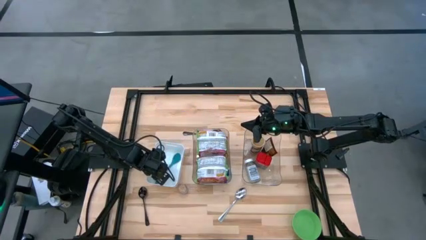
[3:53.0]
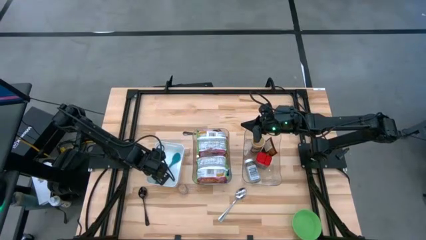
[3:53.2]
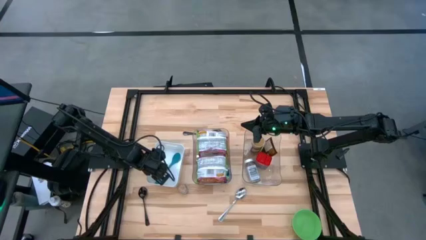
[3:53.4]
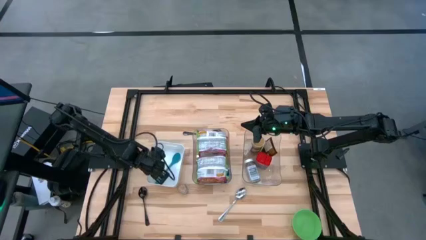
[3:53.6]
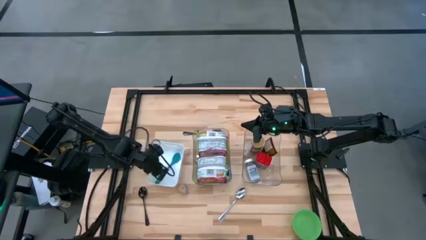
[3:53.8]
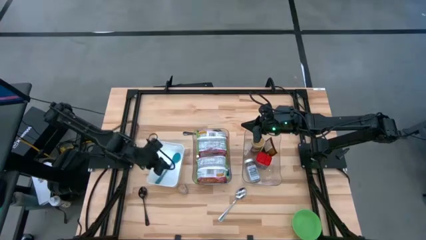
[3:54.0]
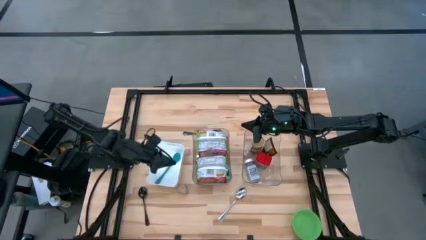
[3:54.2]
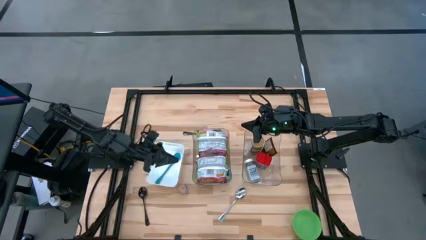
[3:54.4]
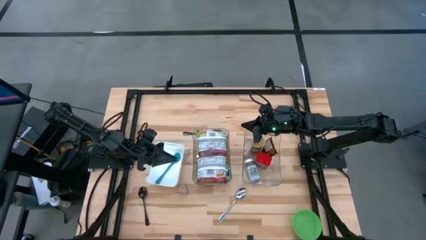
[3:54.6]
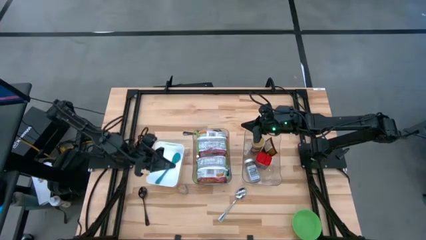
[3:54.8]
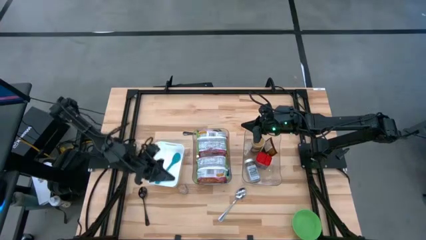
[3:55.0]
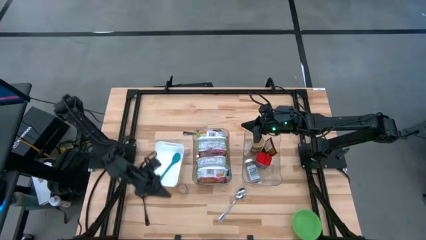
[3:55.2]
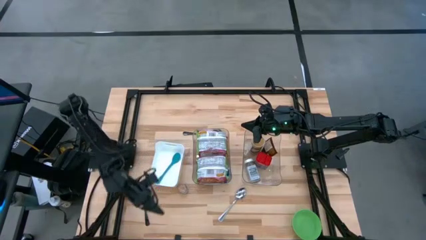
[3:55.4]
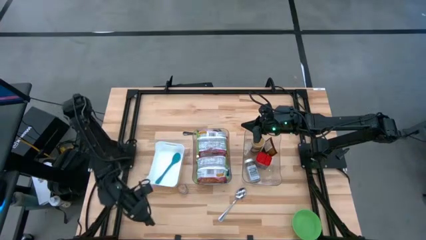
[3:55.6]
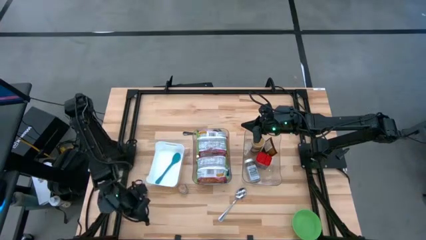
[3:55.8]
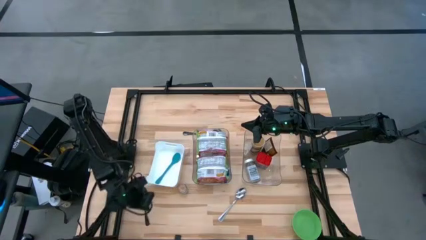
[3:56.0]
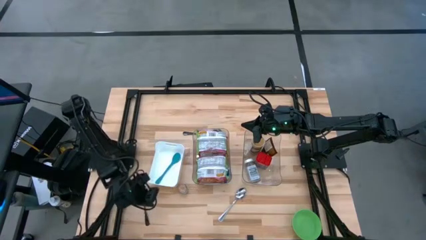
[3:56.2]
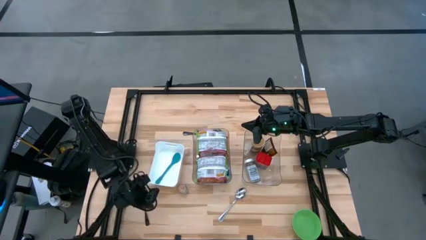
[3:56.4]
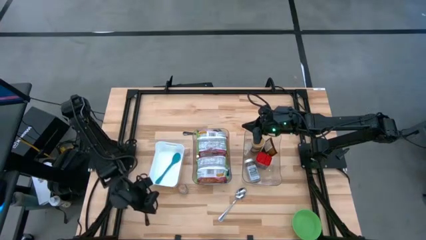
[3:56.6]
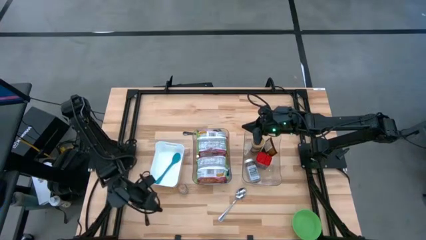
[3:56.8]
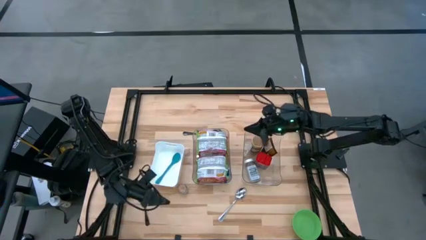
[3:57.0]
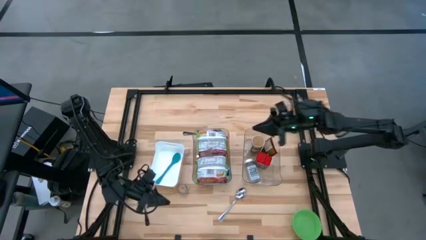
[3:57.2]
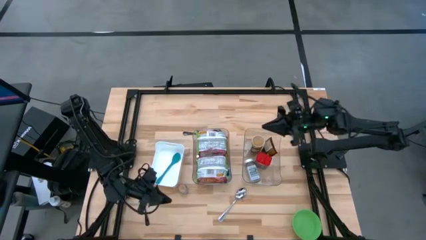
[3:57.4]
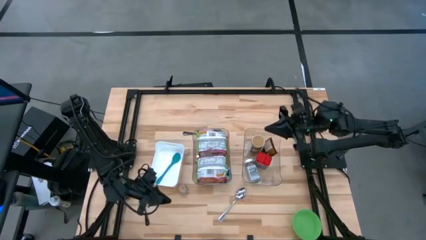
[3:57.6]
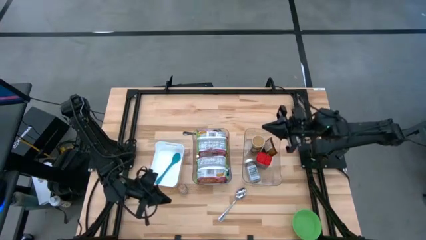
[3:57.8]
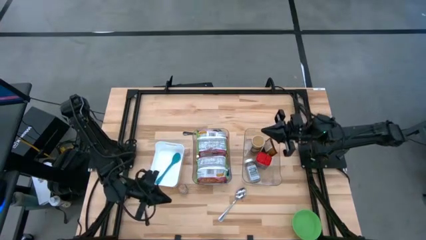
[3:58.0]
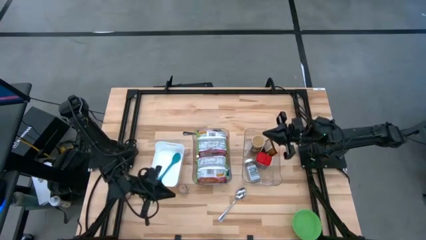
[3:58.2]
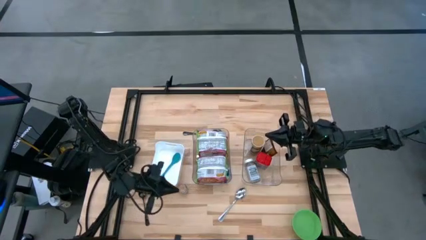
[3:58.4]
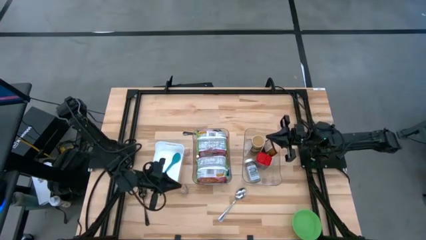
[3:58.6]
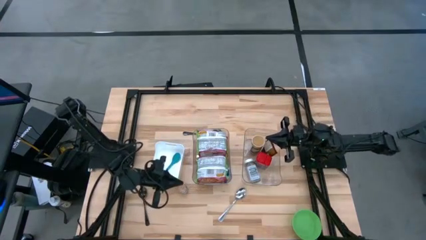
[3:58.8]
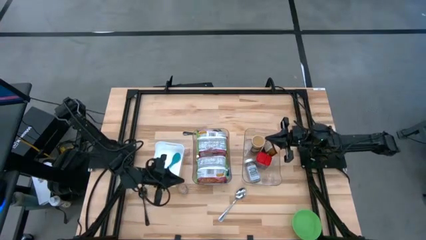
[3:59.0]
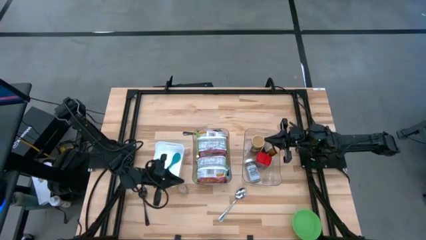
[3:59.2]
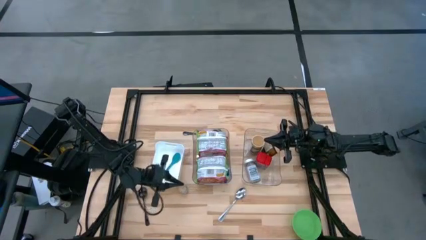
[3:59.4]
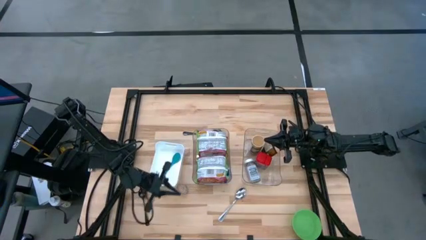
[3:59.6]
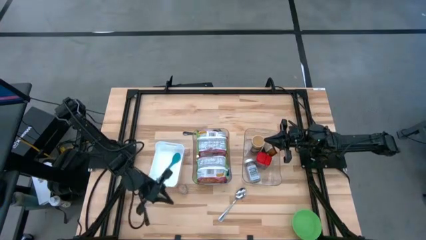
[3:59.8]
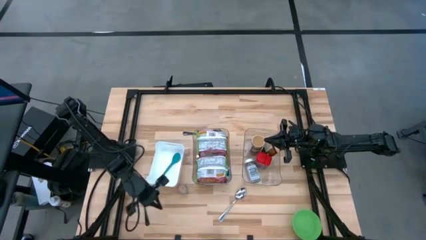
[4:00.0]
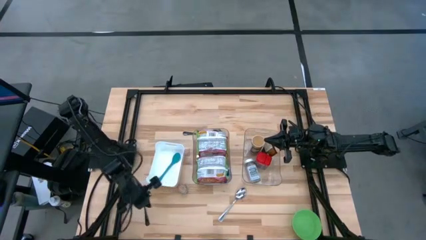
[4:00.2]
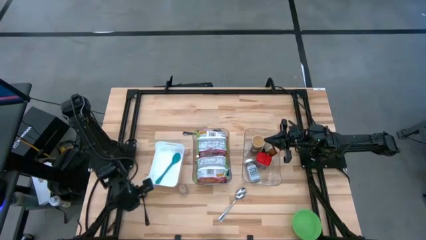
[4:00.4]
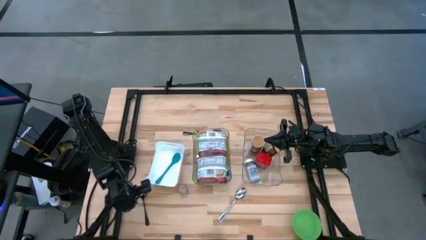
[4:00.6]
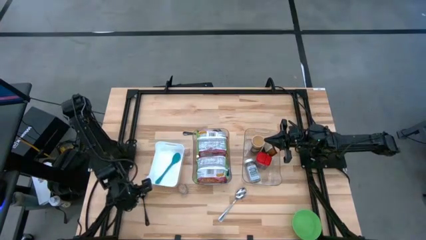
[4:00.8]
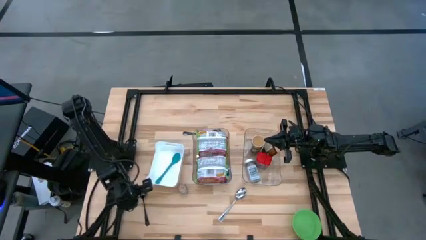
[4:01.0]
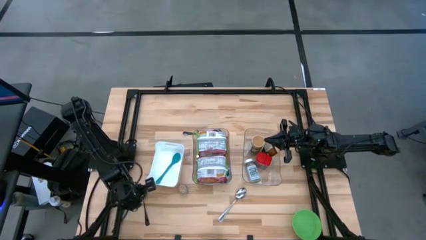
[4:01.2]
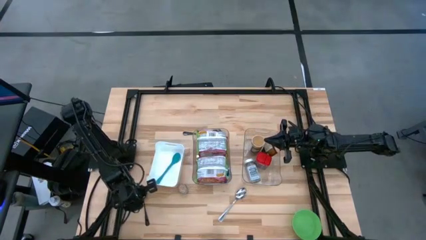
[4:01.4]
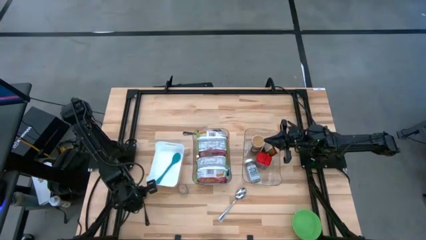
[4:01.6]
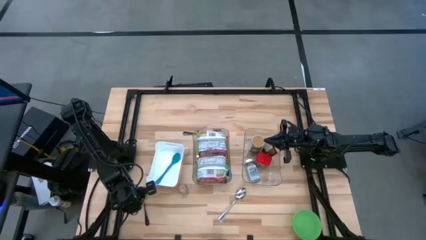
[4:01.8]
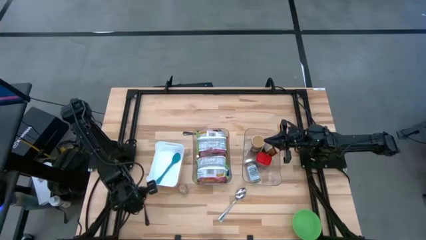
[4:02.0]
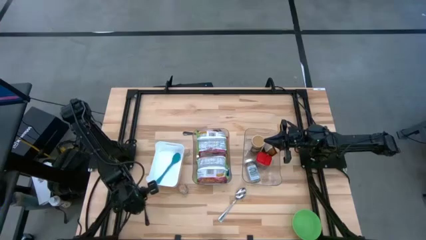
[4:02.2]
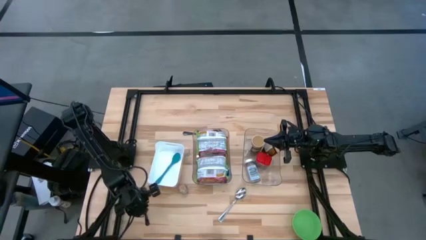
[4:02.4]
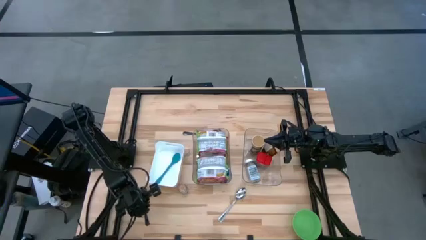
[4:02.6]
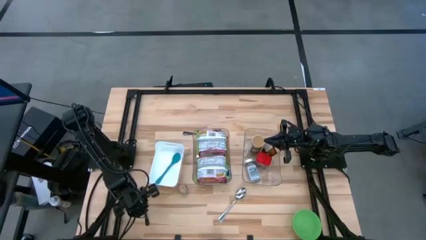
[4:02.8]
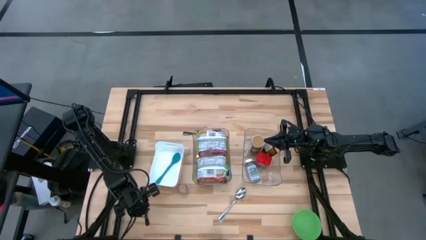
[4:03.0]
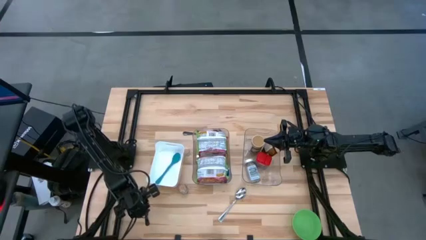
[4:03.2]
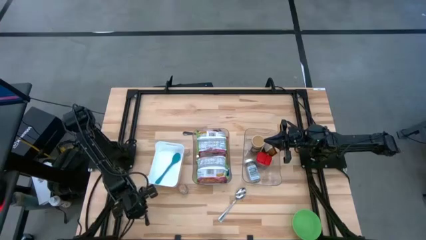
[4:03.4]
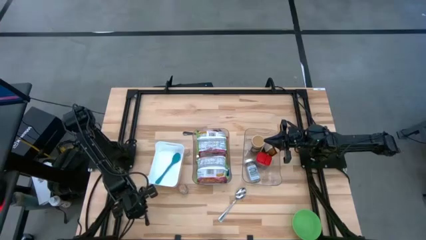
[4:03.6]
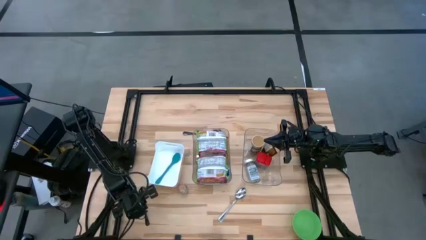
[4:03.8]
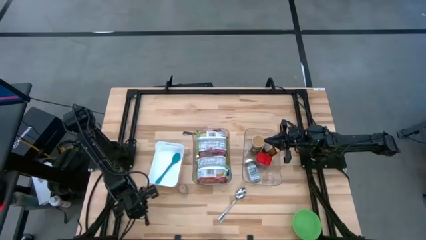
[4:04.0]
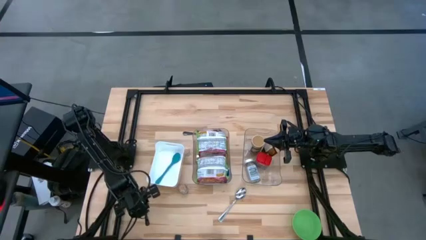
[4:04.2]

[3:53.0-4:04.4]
Task: Pick & Place Food Item
Put the bottom black spoon into the white bin
